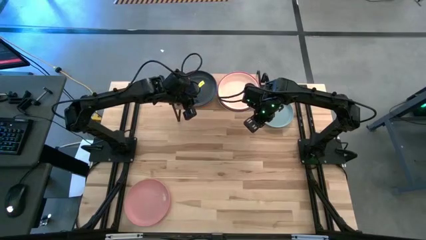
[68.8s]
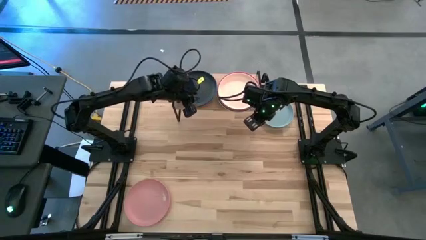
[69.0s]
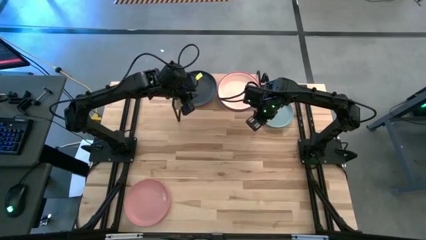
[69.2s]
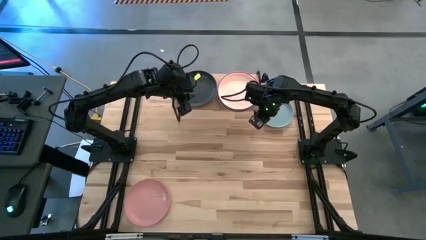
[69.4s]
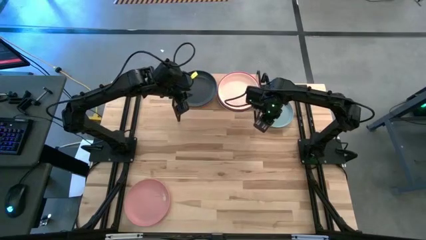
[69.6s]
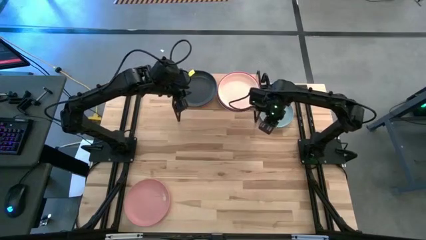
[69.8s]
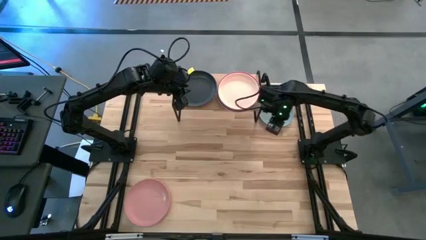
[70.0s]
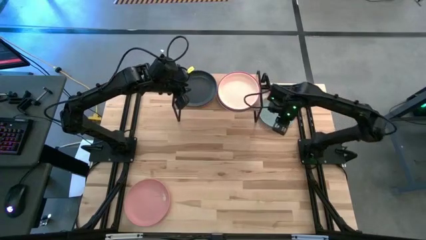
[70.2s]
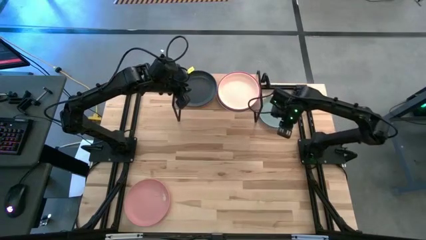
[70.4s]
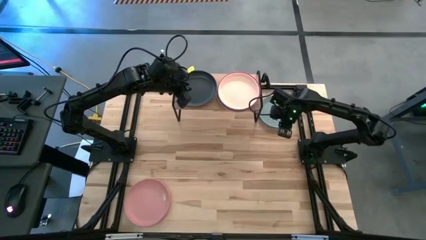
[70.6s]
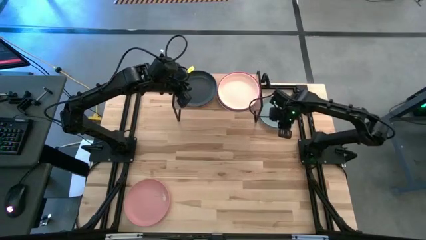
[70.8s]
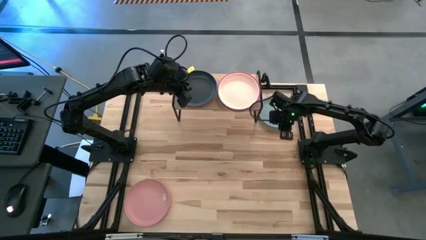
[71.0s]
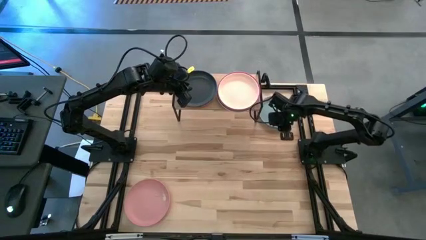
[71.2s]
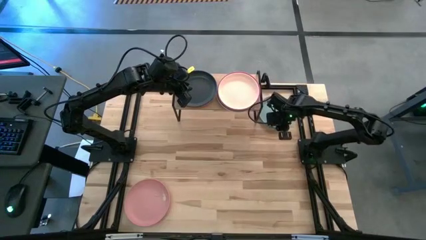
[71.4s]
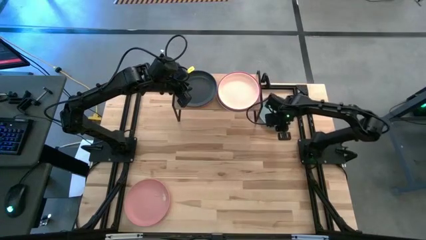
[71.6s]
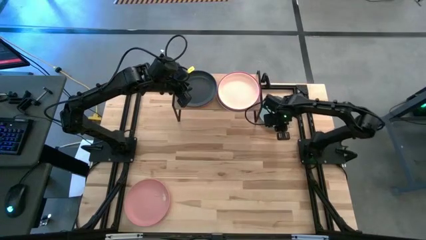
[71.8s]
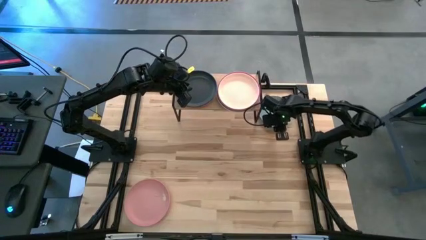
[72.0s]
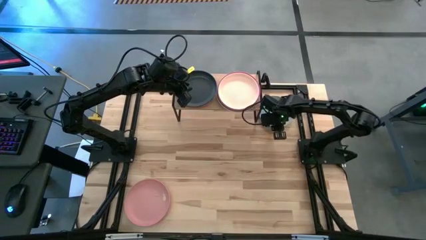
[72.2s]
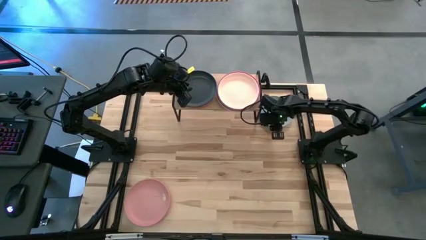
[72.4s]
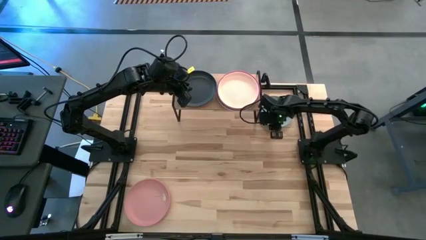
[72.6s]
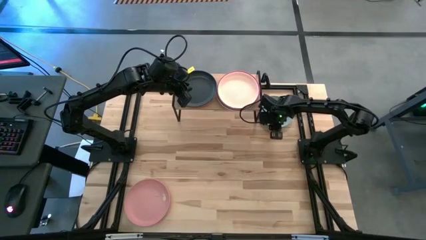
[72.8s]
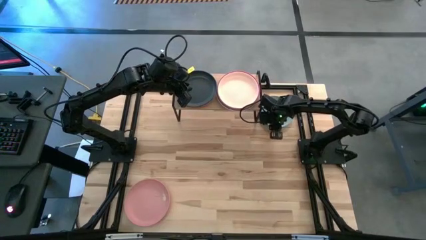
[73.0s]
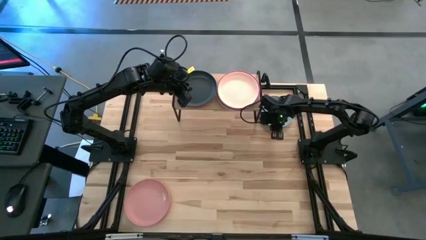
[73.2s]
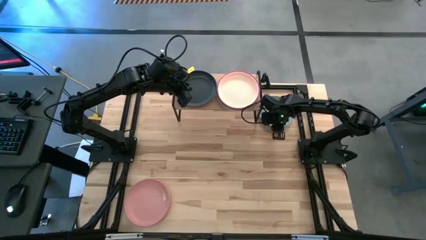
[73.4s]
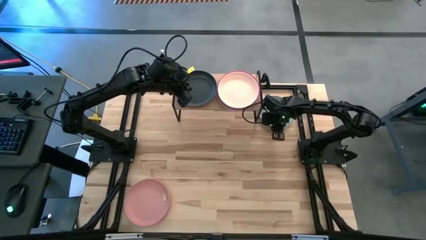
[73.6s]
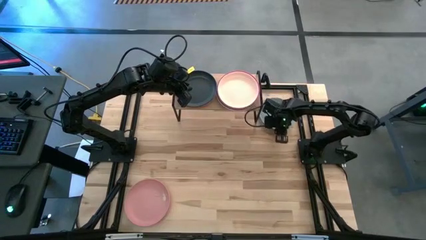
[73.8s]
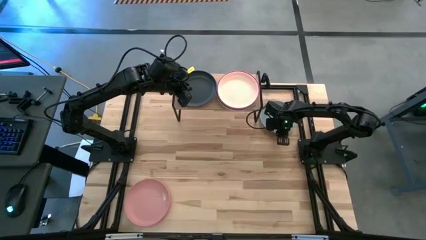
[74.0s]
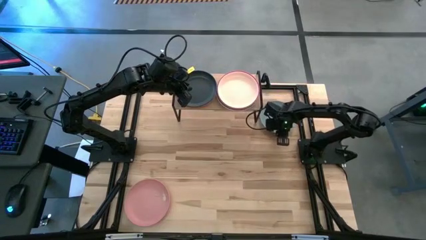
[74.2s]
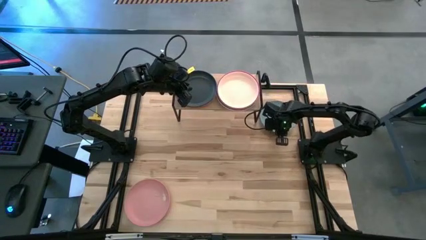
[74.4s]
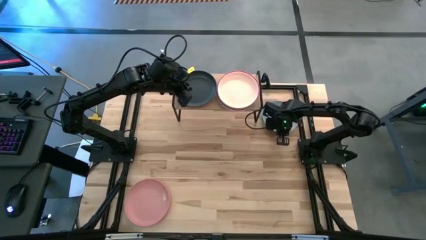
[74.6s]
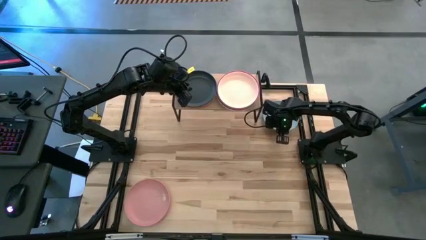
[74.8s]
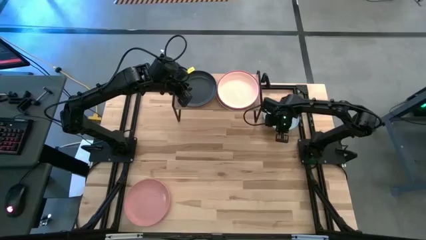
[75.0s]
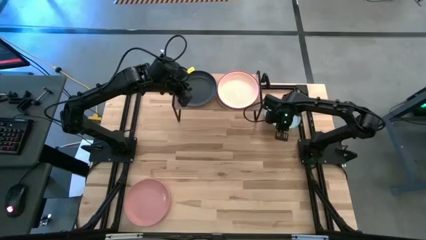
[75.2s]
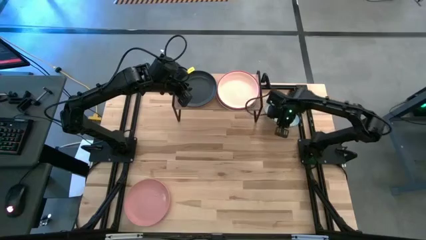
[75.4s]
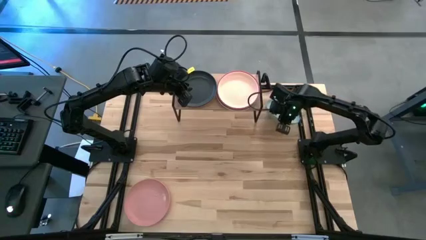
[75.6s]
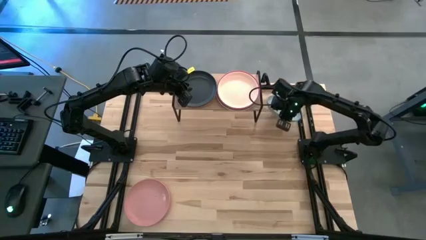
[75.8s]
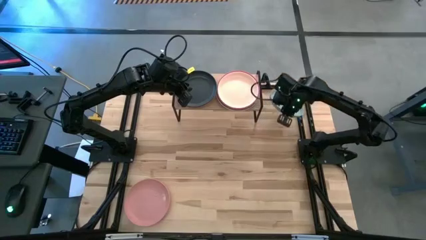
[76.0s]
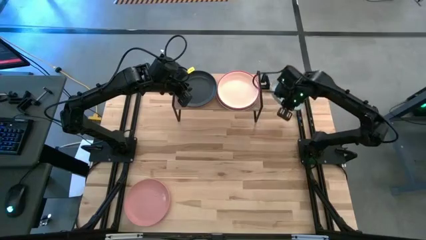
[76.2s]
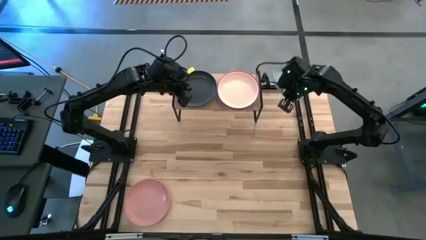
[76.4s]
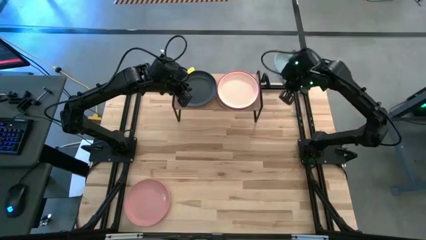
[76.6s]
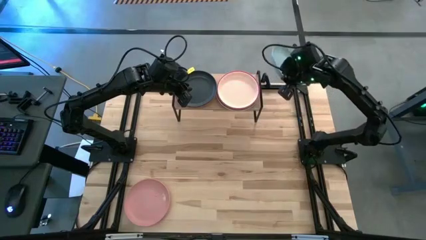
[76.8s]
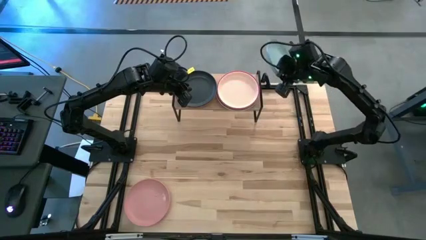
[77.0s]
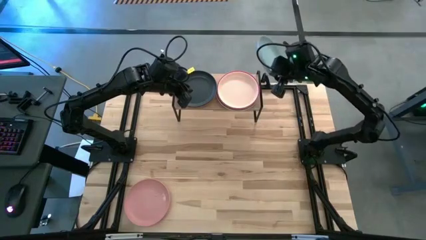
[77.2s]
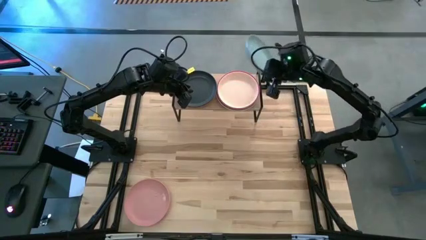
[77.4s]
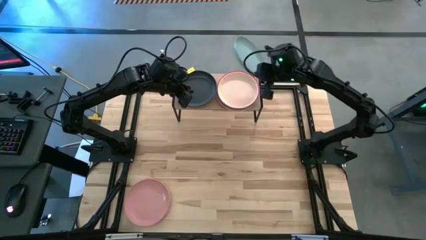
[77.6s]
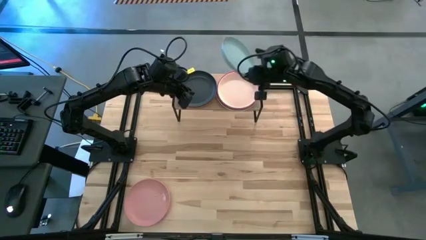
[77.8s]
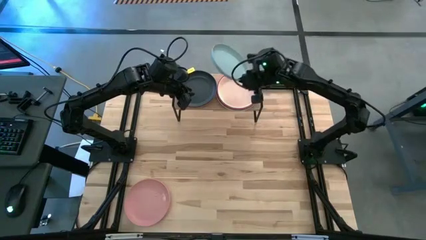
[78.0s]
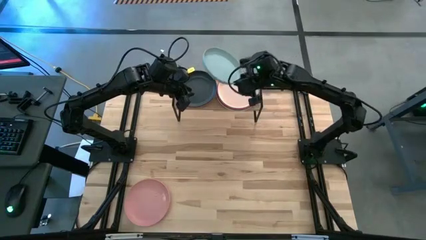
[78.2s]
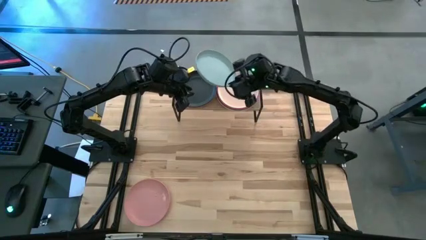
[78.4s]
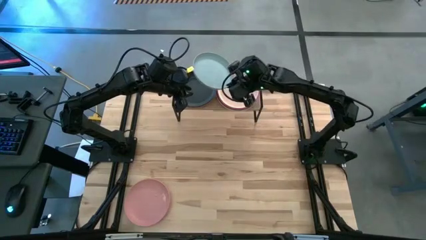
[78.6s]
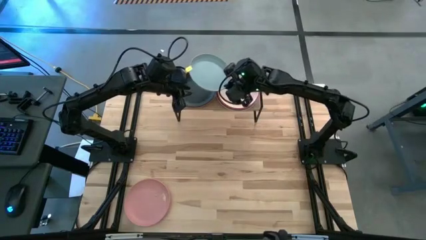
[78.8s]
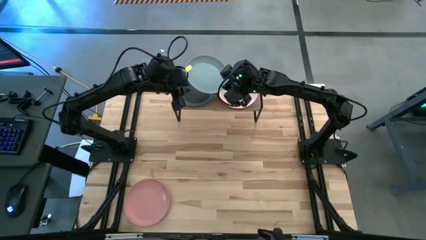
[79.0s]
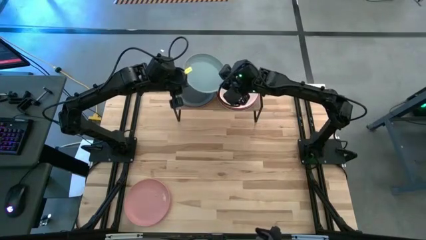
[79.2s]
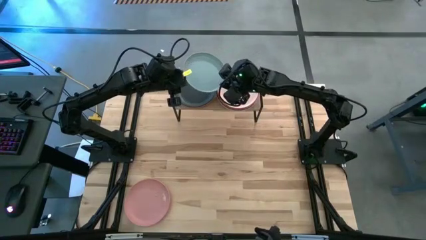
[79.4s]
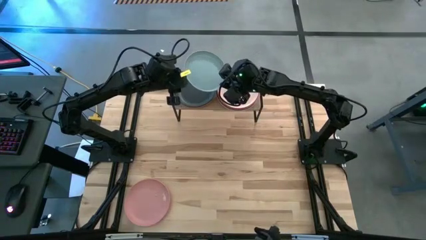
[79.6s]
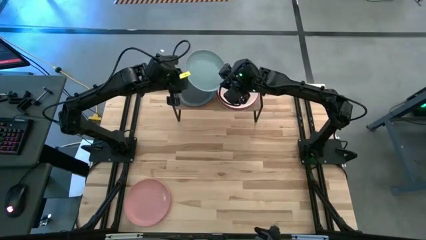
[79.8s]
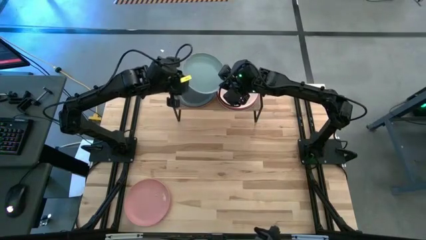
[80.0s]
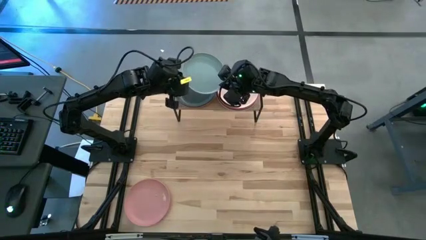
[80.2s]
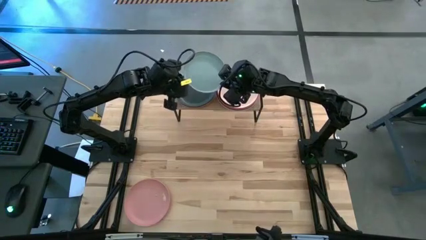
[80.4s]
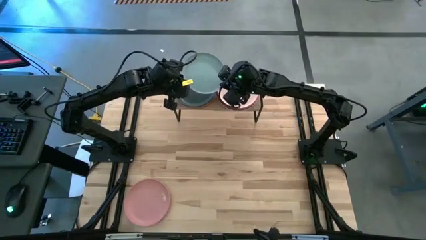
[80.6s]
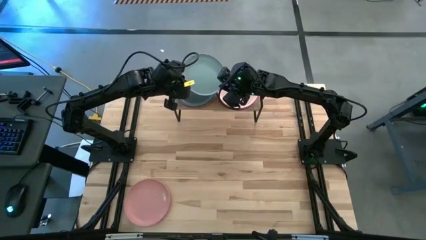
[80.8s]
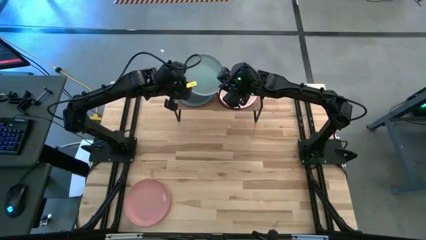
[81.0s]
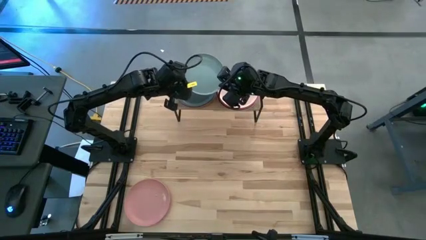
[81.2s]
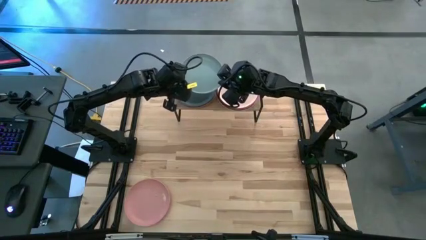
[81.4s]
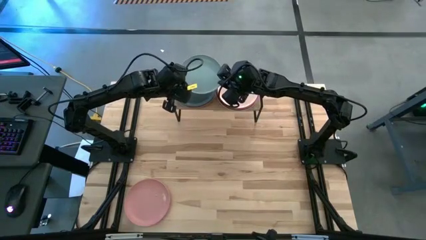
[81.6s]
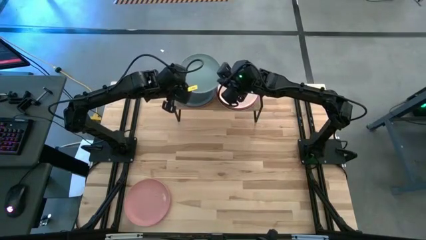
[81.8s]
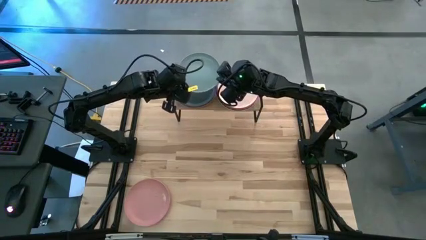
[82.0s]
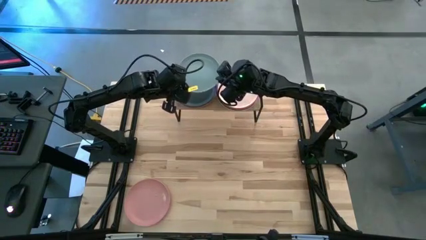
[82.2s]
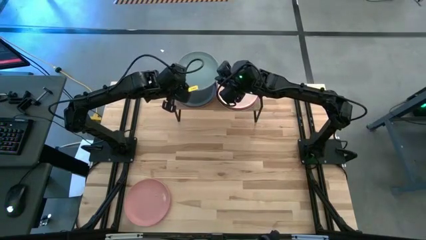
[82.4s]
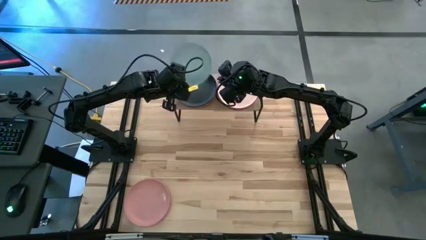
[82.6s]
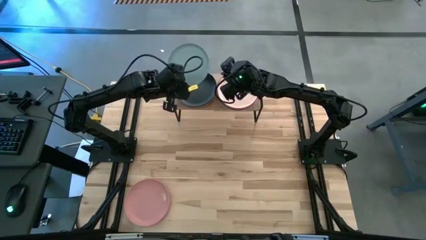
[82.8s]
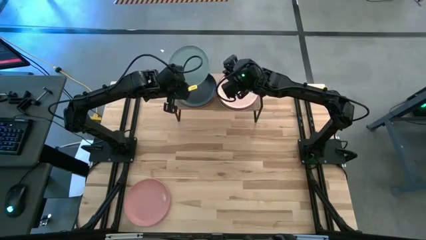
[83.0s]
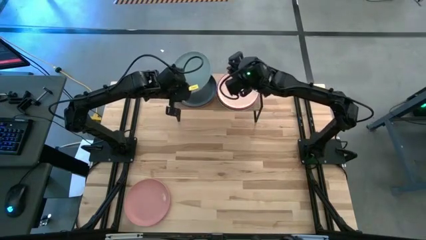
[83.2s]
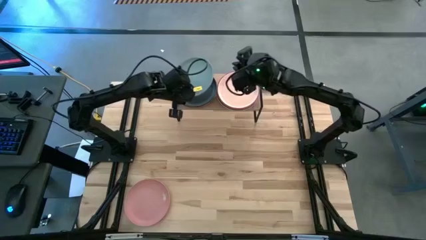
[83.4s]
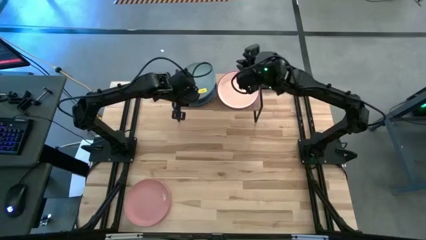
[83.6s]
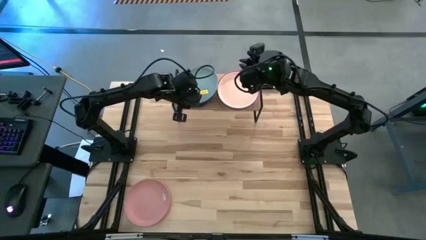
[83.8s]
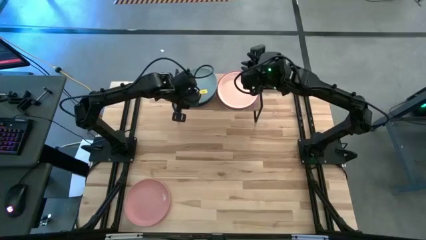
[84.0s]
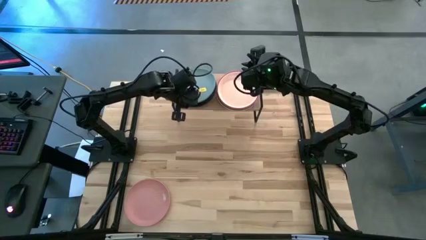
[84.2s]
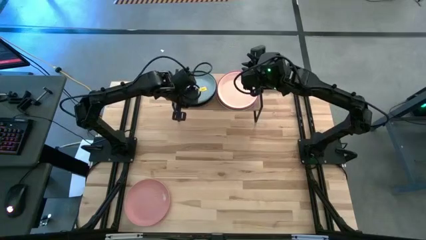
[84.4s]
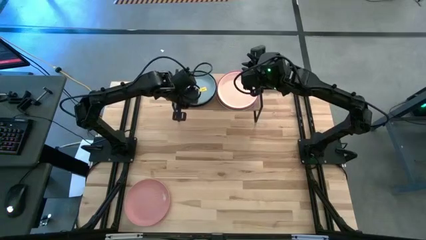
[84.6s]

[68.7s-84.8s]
Task: Place and stack plates onto a shelf
Stack the light blue plate on top of the black plate on the shelf

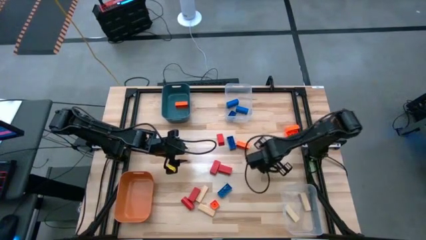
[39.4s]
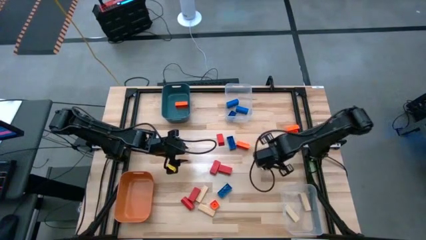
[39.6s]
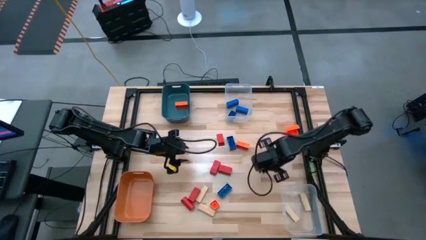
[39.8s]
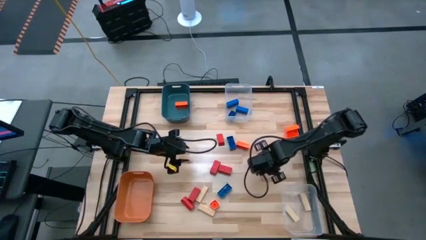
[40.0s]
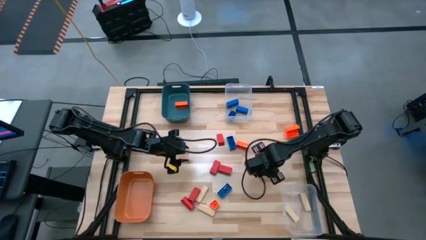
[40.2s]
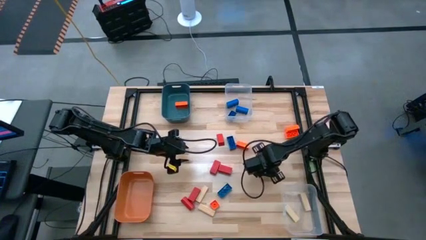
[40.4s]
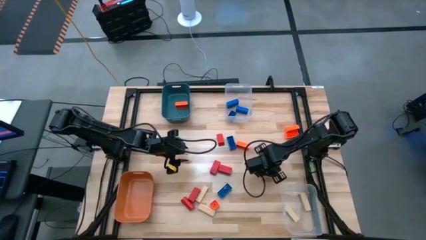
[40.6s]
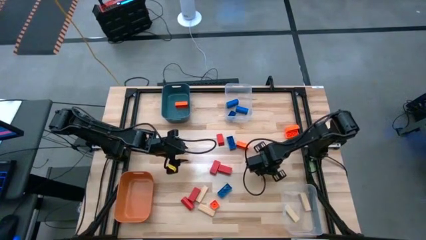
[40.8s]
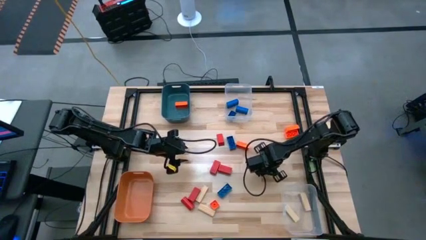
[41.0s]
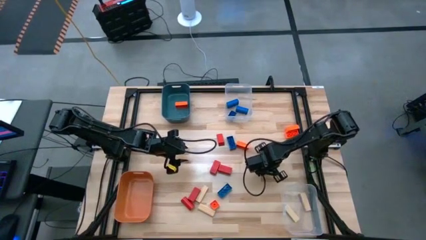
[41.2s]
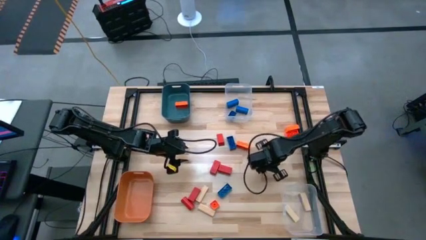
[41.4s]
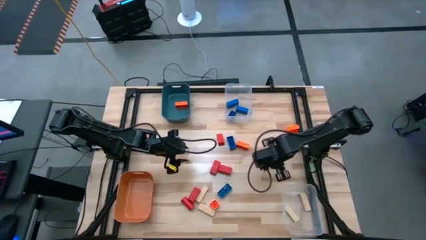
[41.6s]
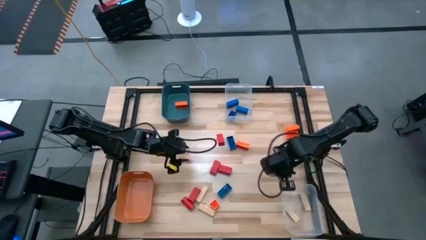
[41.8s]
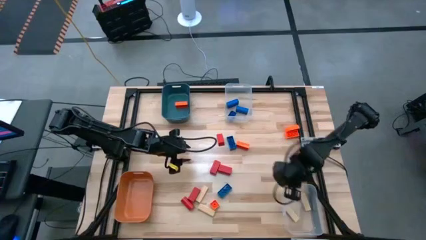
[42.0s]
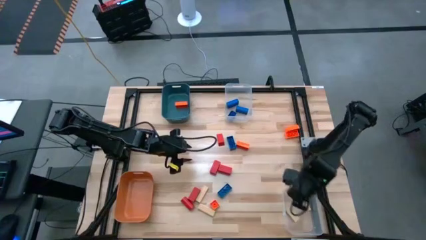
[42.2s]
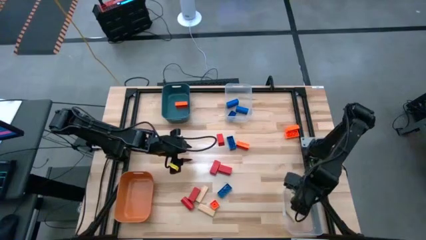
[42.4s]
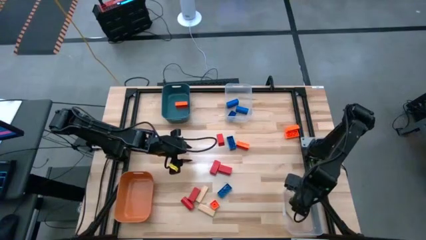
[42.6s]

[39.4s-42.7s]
Task: Sort blocks
Put the brown block into the bottom transparent bin
